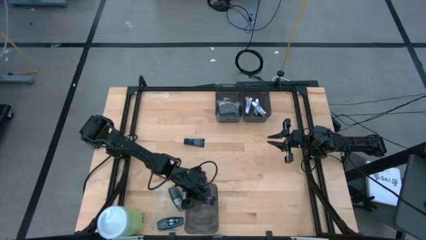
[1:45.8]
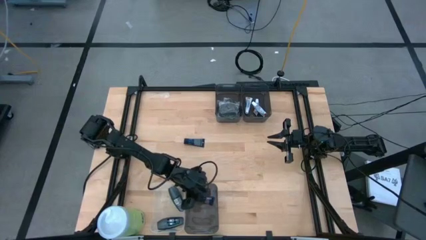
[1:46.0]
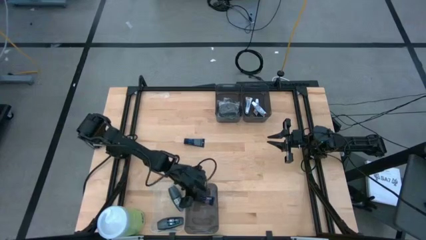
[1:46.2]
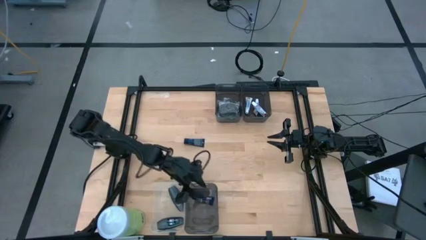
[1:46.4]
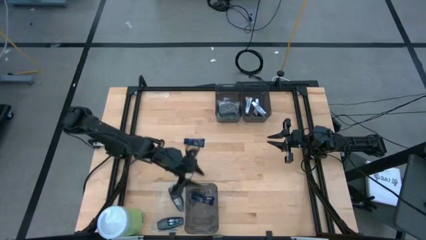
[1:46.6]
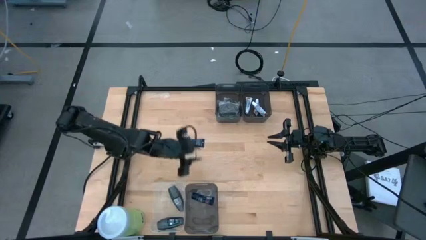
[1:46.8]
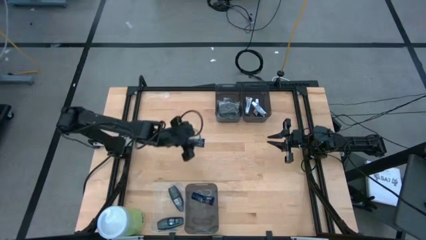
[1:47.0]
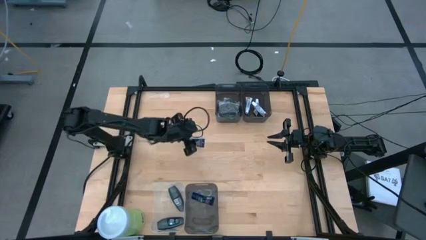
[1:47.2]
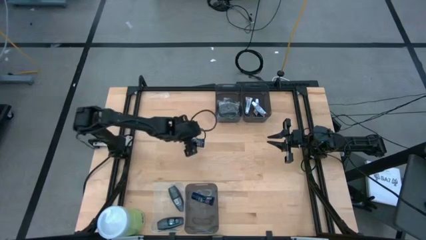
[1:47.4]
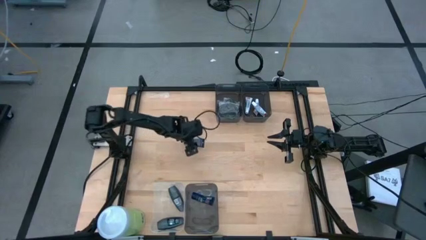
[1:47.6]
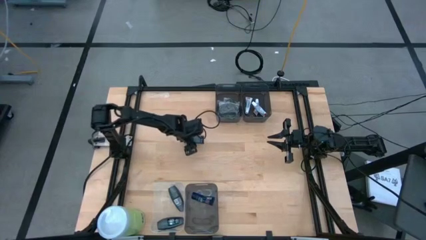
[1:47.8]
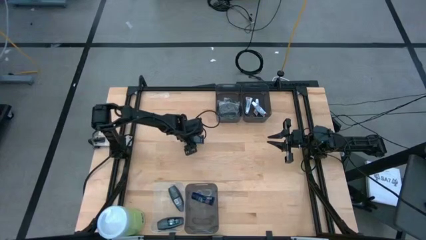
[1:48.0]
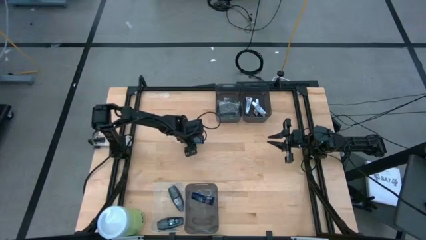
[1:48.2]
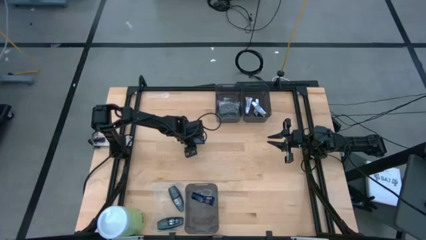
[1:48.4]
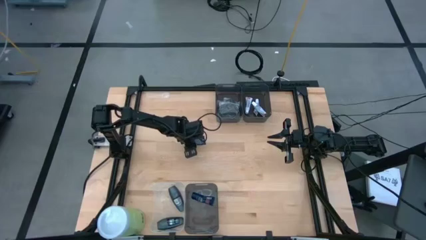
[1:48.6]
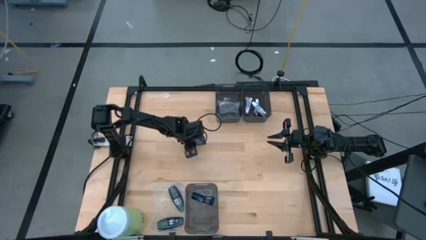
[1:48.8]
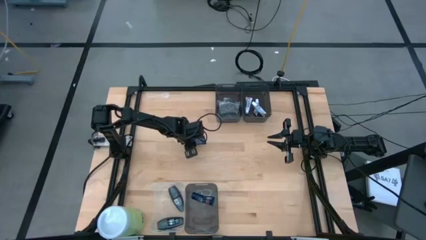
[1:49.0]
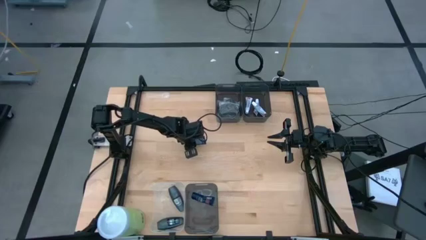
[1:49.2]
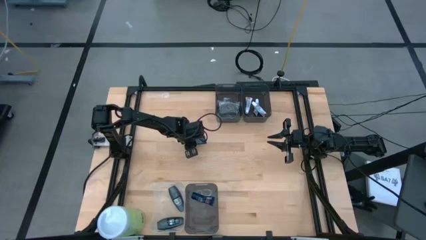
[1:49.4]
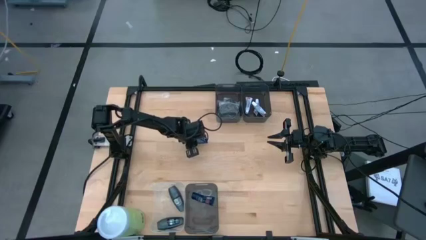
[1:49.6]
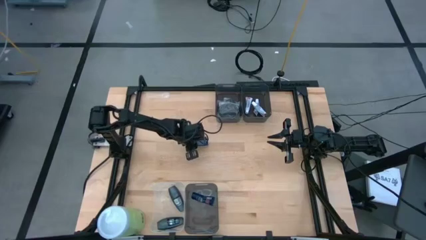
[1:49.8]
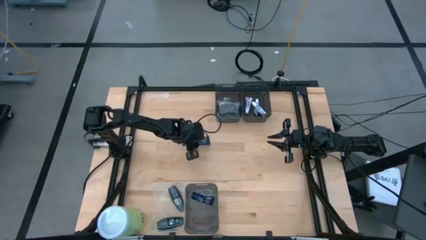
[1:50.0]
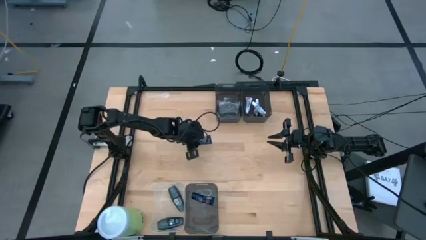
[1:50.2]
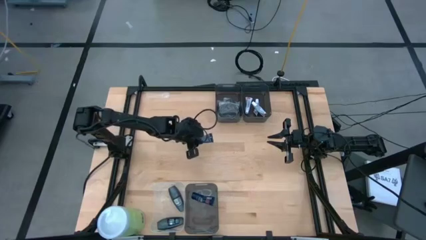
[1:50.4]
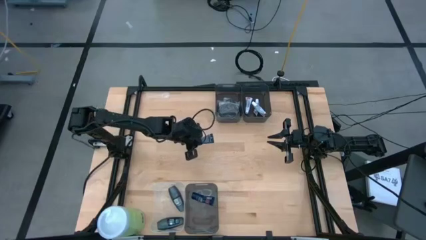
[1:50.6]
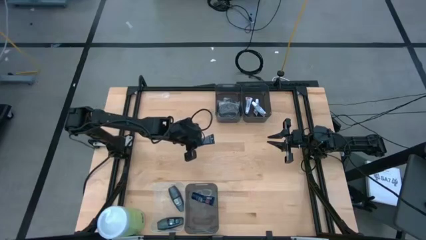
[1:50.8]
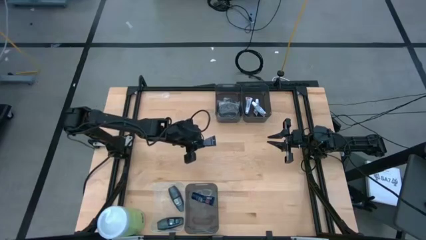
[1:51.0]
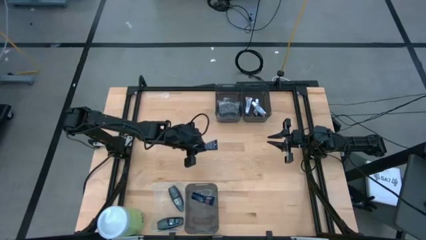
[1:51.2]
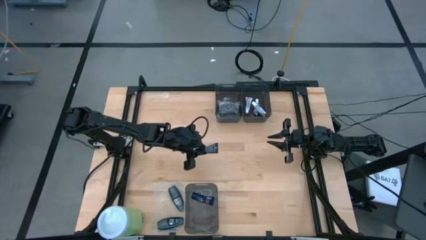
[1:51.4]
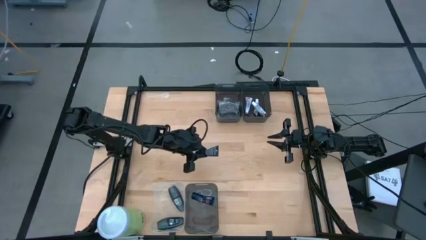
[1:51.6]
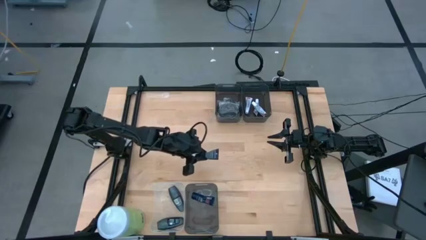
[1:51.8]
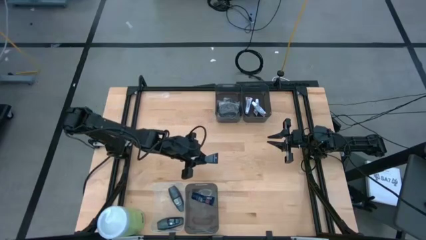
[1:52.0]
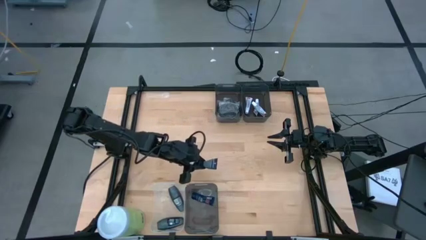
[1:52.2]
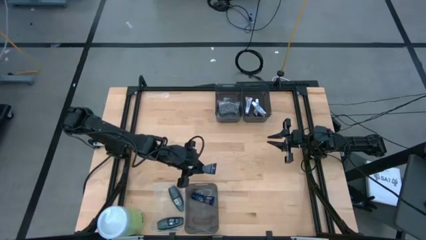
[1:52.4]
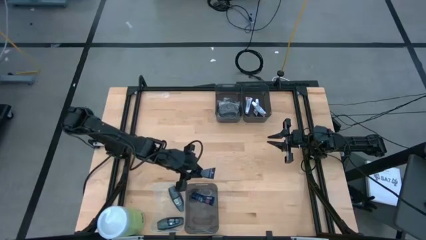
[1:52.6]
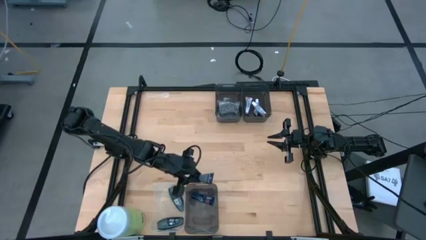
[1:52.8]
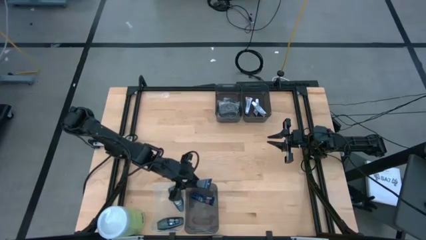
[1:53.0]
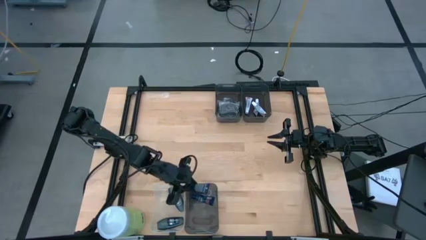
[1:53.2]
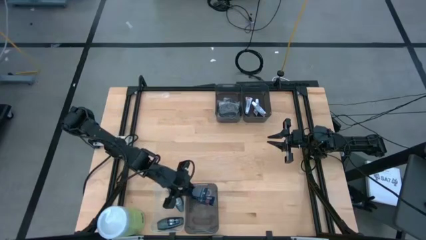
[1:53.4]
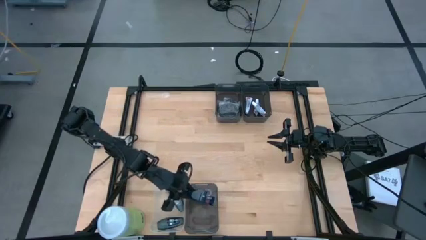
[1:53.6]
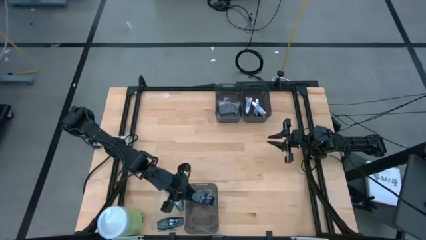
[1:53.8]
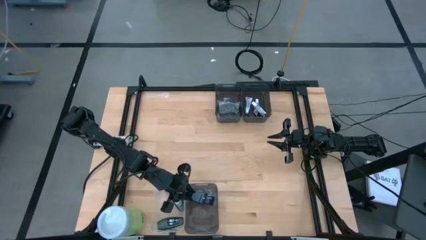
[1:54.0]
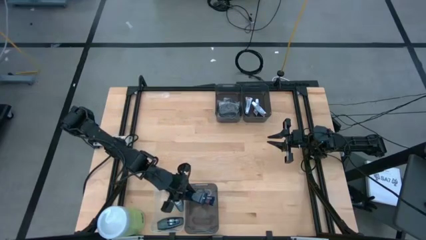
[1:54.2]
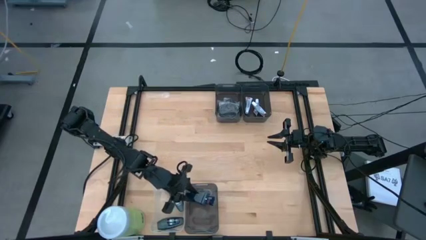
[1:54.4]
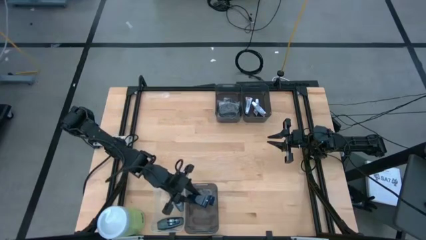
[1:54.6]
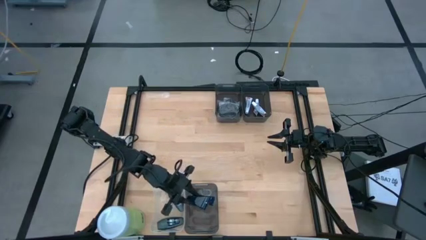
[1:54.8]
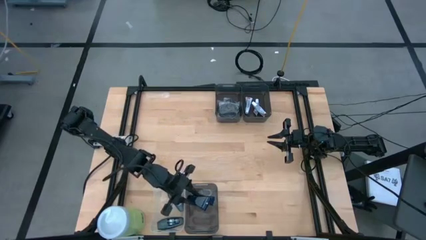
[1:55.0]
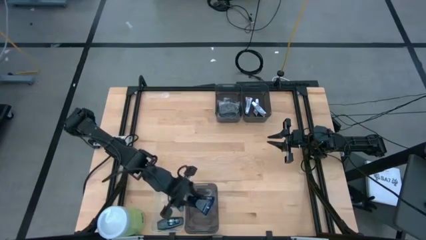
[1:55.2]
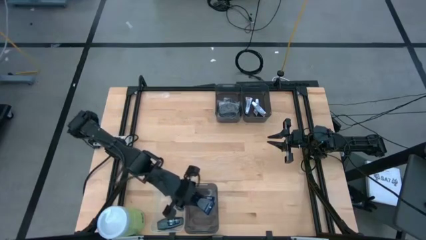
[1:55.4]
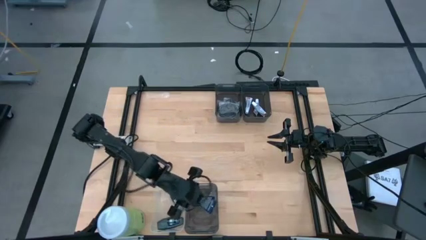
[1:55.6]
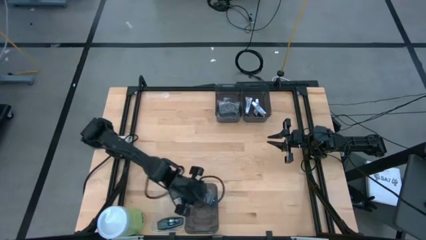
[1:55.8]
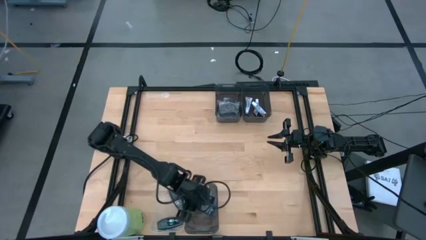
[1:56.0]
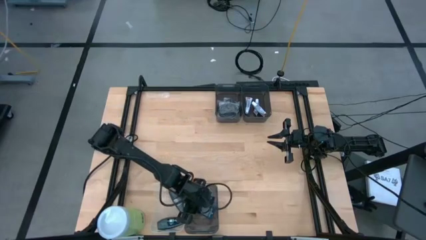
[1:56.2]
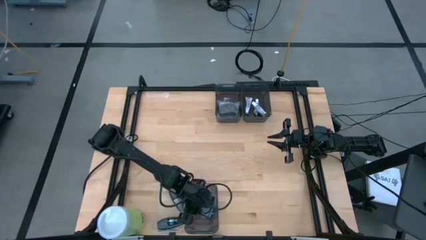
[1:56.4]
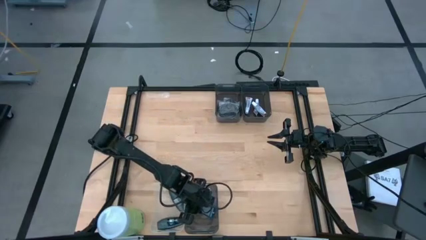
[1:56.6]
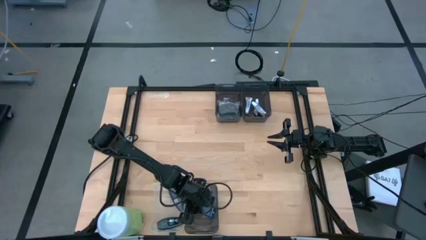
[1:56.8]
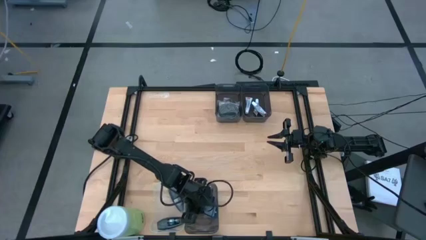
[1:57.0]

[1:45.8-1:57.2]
Task: Pick & Place Travel size toiletries
Put the blue shave cream into the bottom black bin

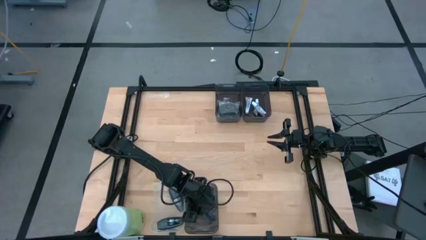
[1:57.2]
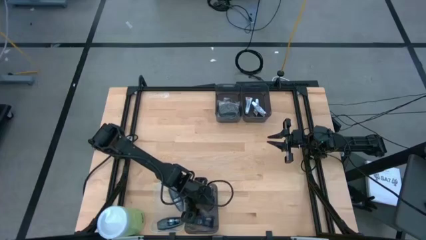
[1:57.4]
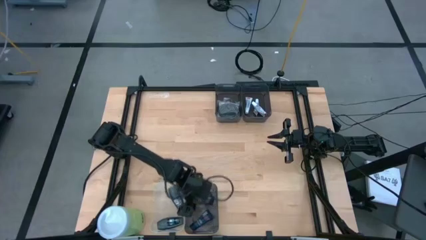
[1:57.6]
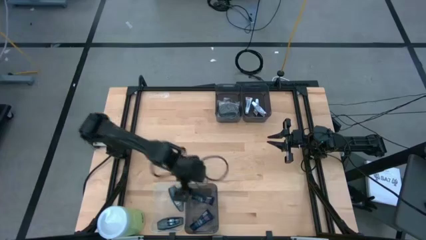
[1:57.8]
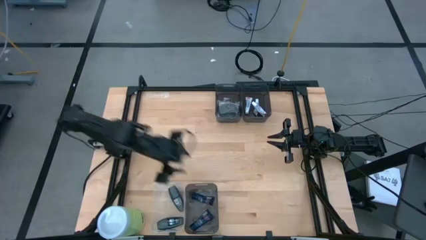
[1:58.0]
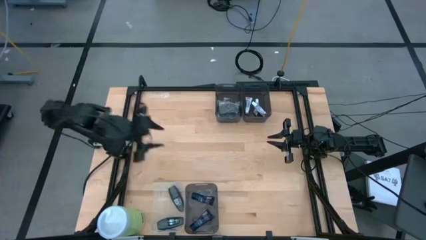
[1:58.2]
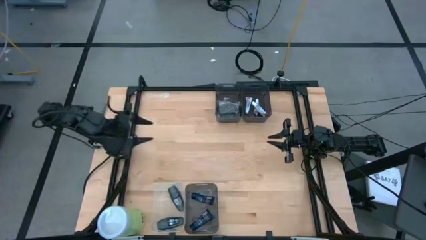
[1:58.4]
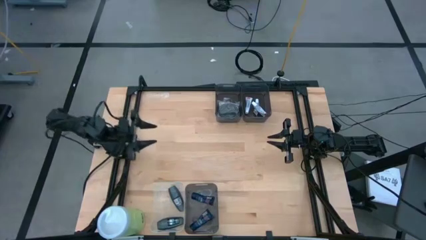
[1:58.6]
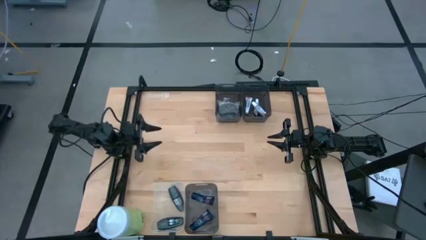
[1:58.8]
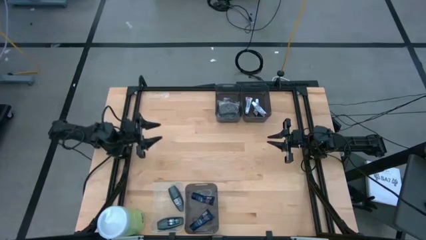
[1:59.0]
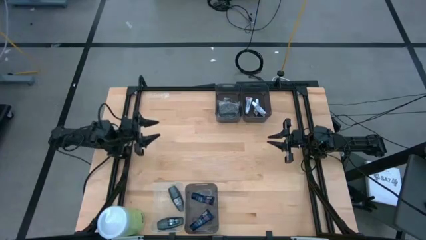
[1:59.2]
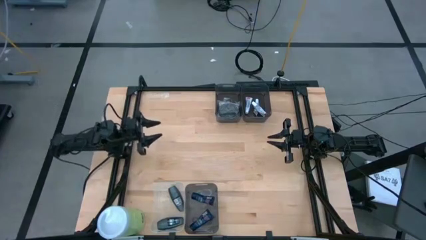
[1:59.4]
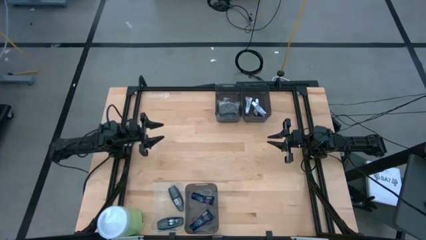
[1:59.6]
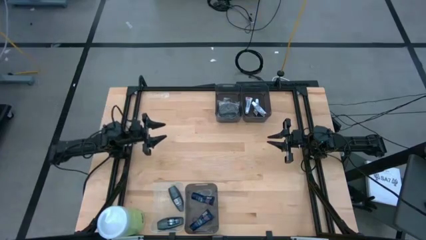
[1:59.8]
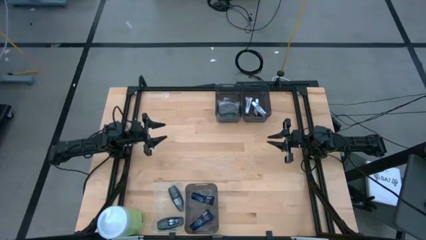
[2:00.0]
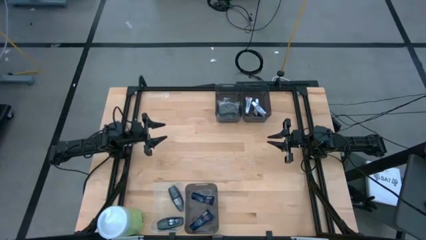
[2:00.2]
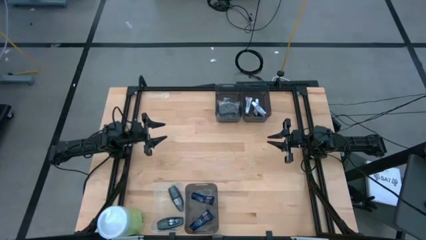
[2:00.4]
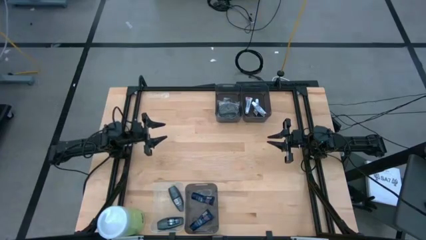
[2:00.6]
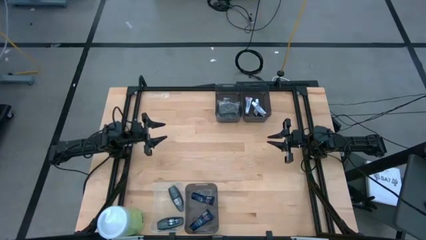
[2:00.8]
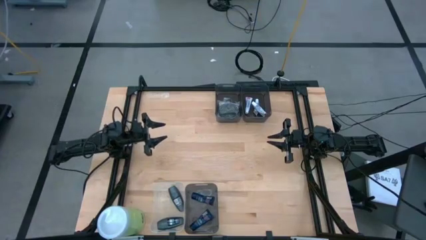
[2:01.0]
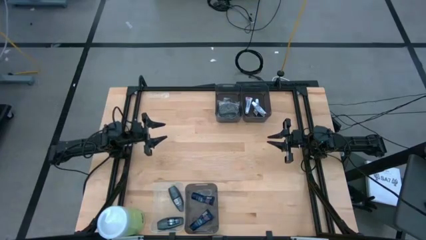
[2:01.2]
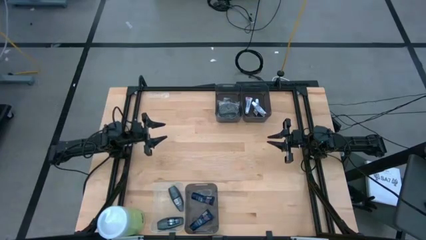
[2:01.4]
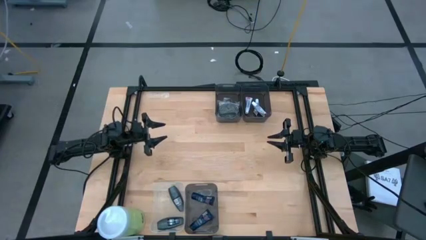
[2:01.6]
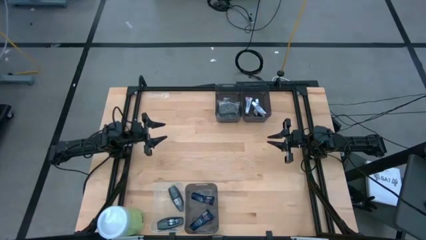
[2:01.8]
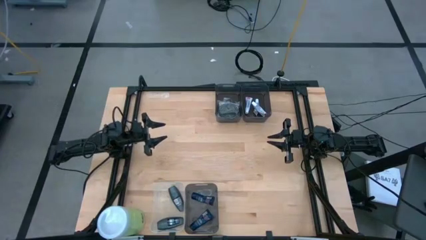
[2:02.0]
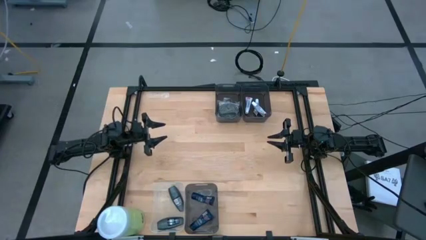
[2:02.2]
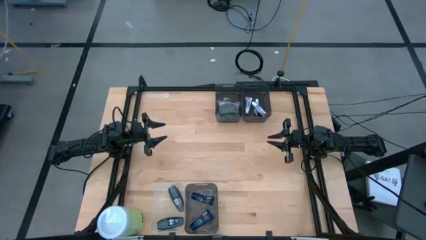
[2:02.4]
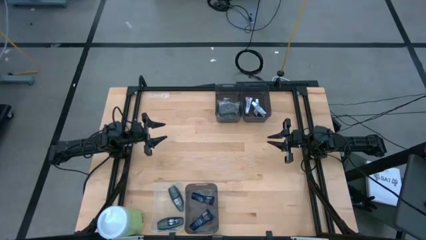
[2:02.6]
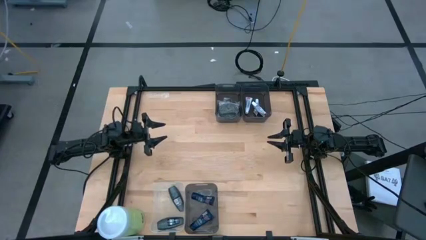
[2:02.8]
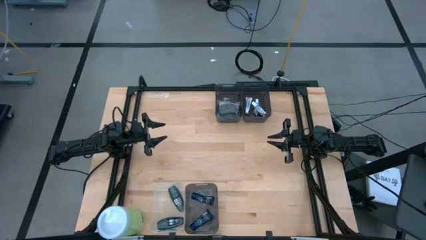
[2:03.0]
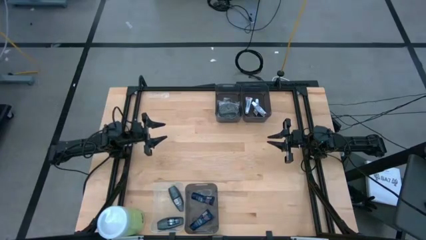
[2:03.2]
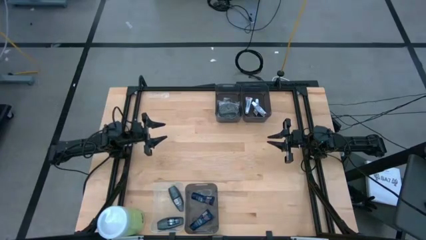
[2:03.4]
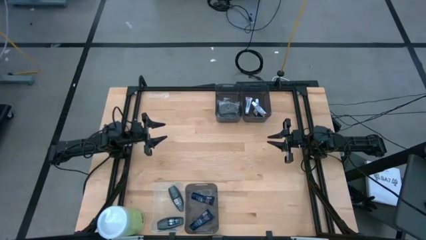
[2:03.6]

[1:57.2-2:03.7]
Return to Home Position
